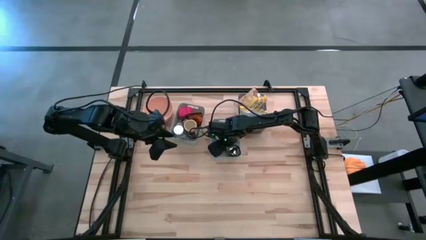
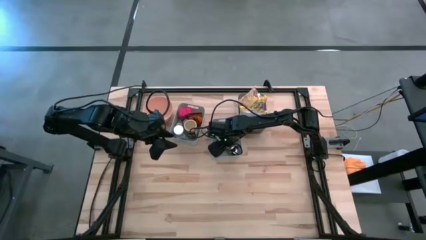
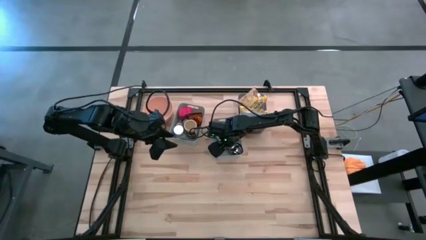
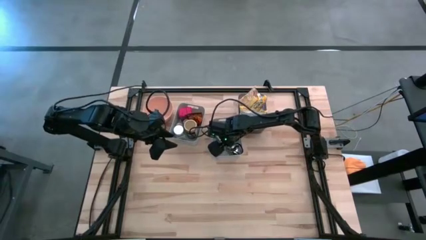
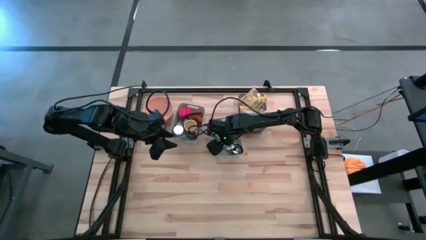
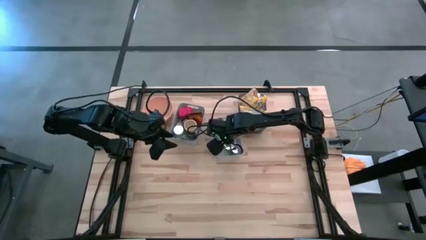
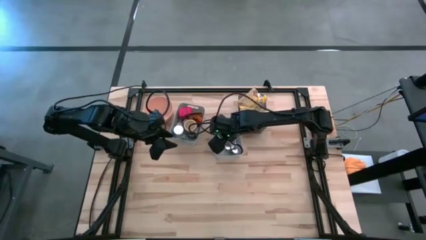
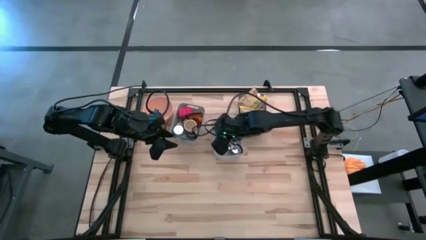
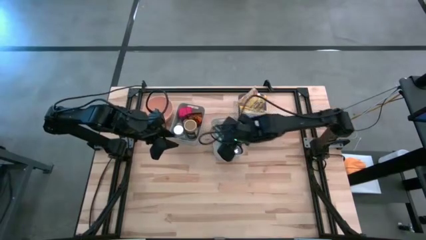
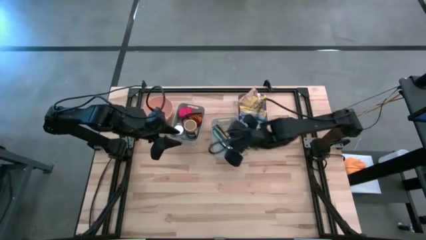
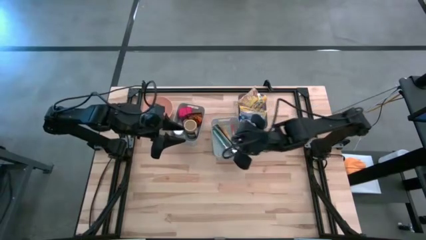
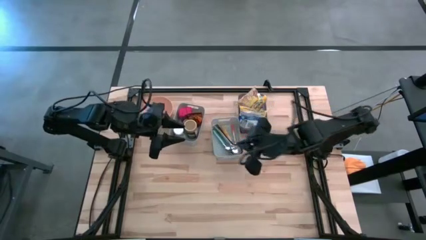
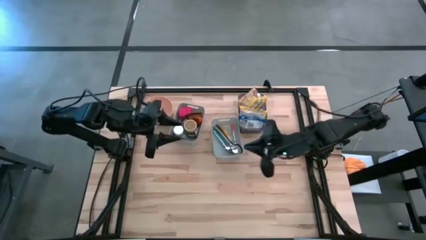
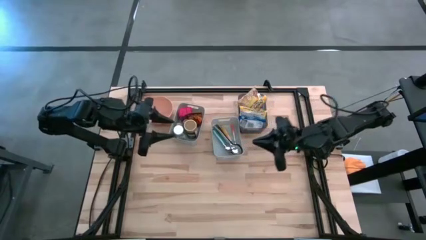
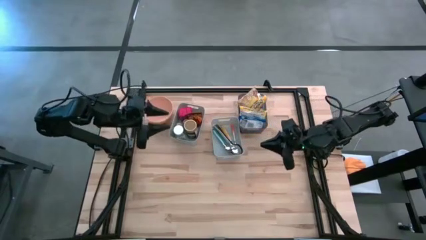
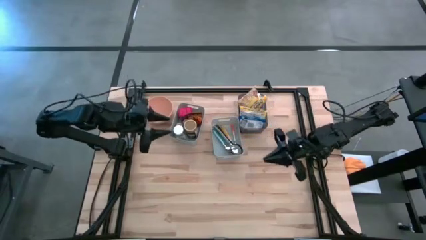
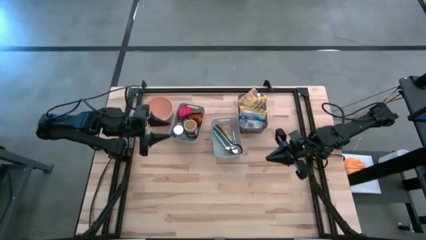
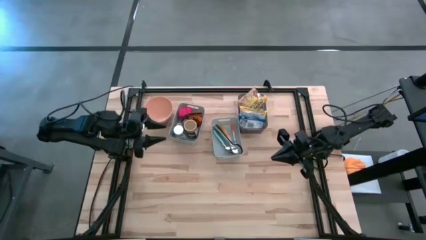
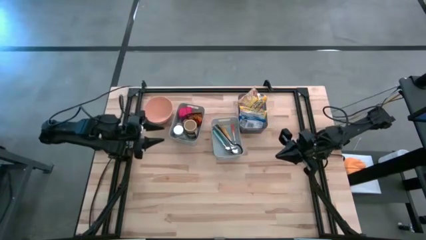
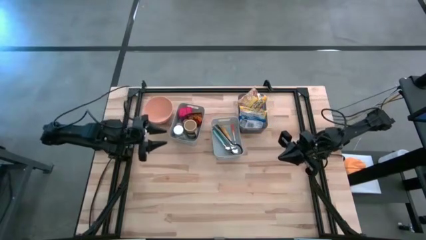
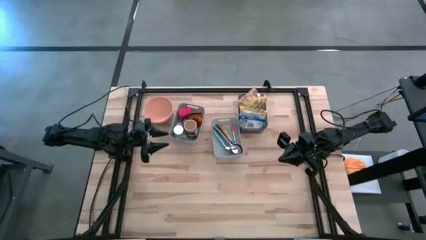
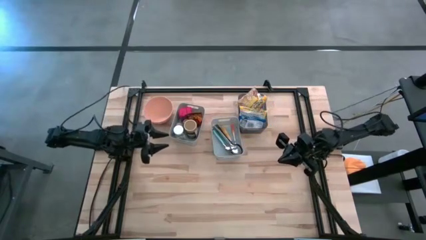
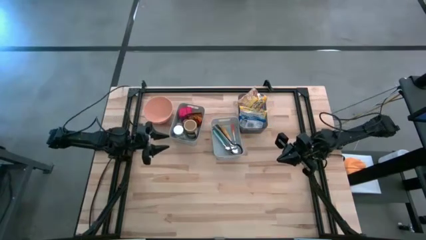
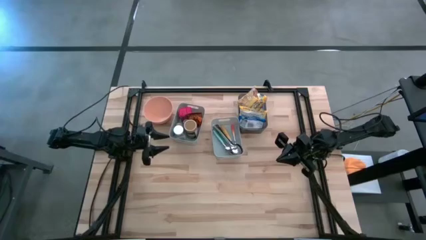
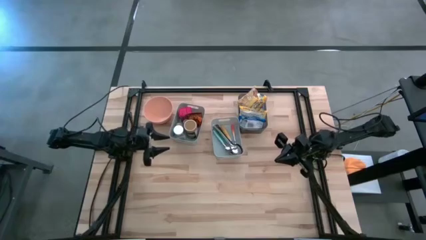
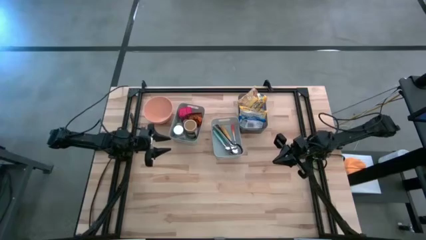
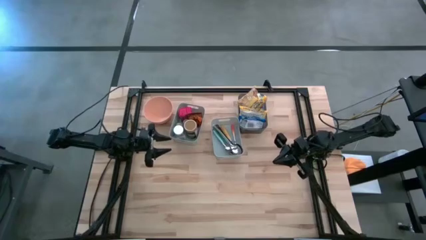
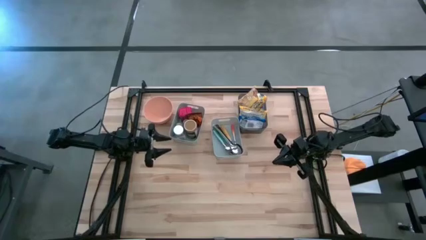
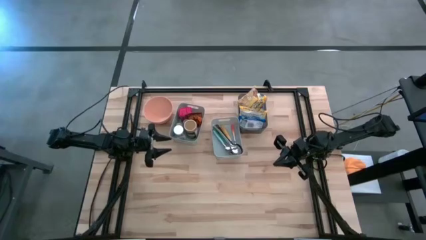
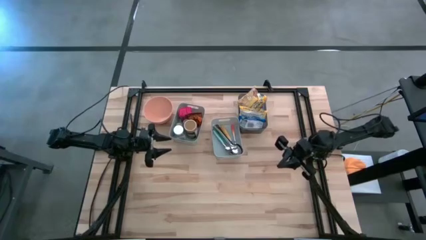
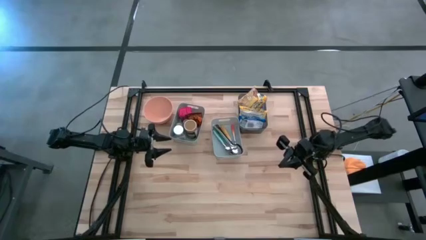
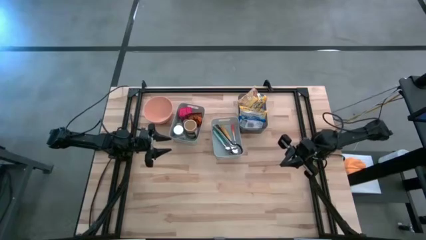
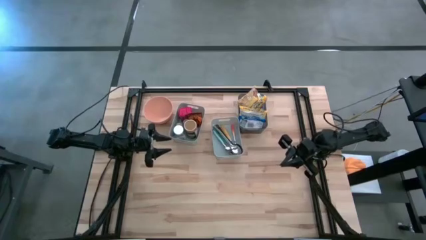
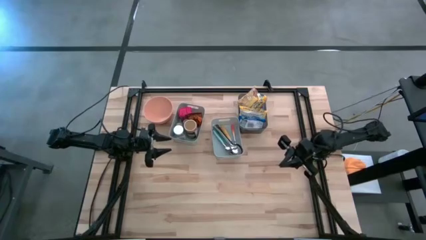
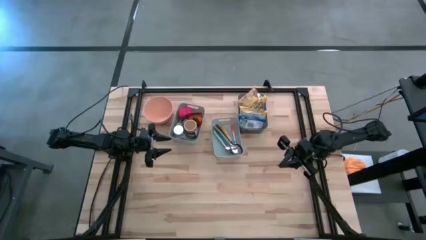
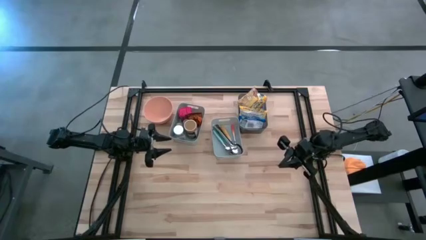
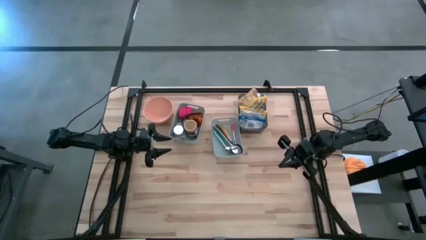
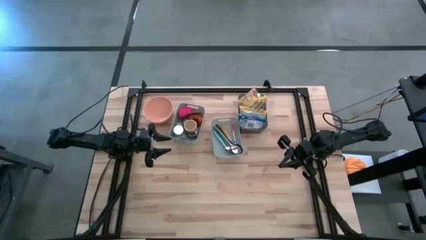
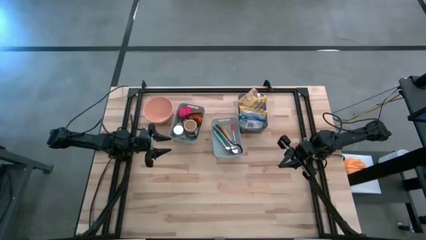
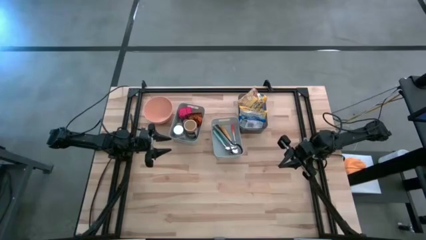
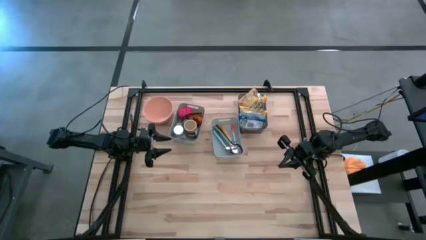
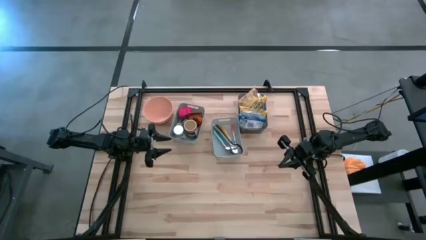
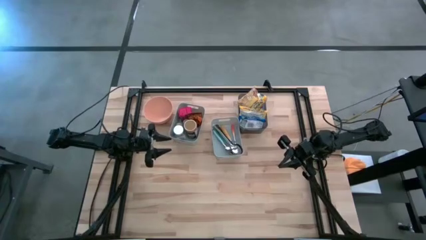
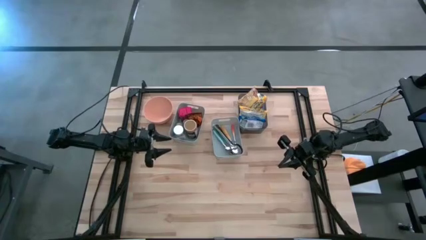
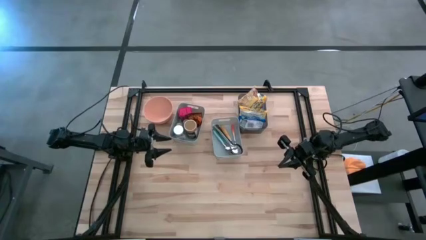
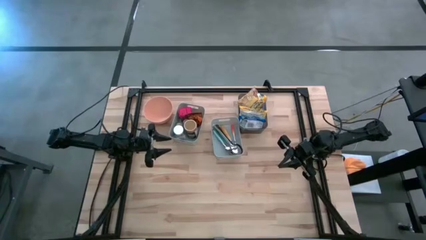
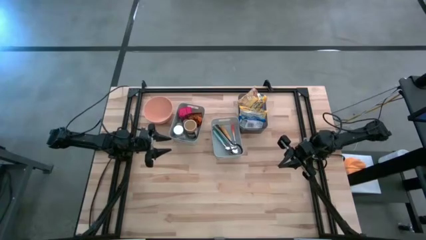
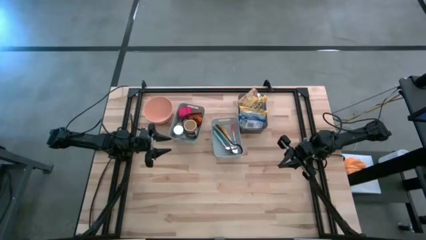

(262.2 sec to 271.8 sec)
Return to Home Position
